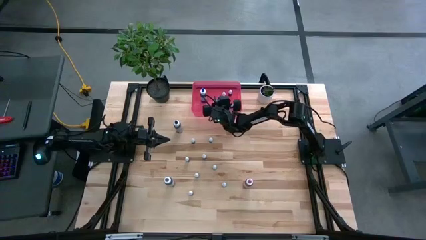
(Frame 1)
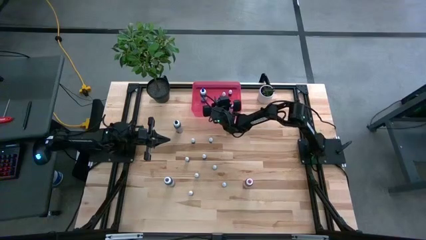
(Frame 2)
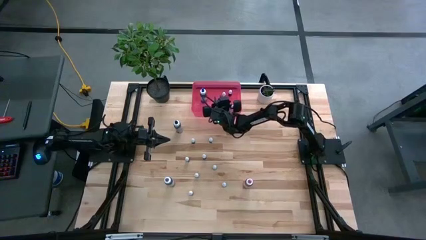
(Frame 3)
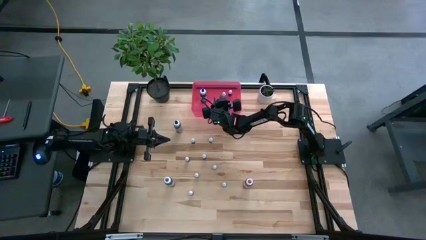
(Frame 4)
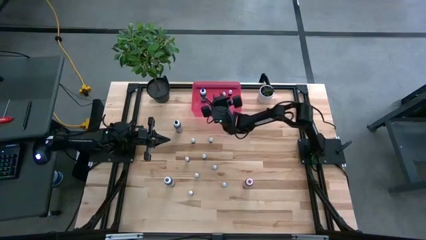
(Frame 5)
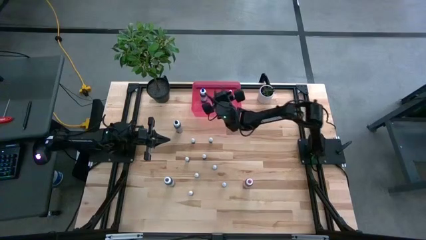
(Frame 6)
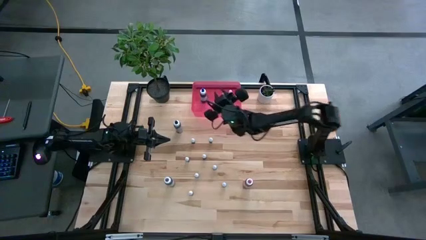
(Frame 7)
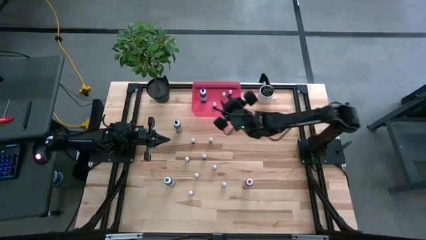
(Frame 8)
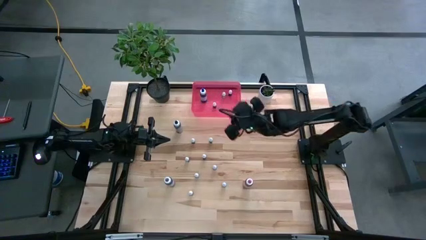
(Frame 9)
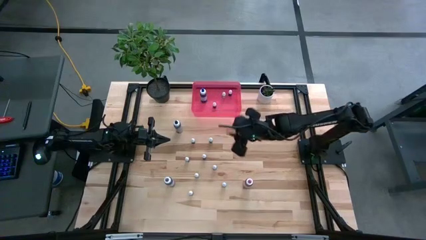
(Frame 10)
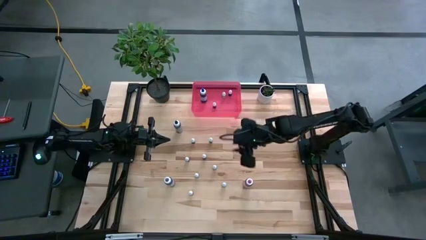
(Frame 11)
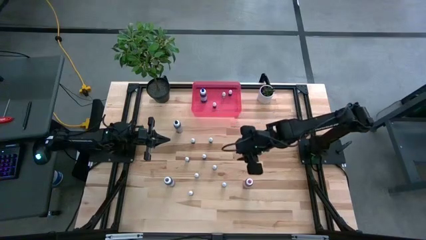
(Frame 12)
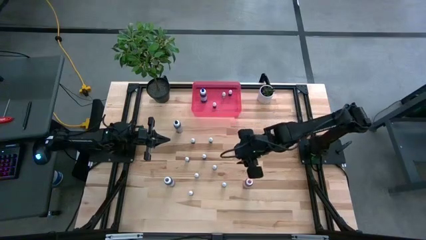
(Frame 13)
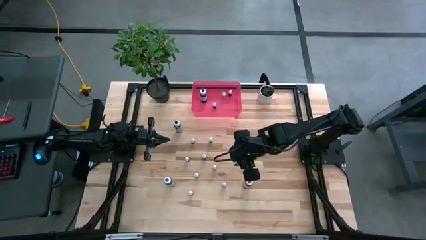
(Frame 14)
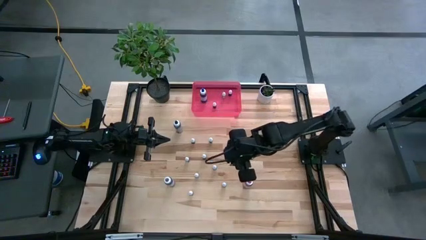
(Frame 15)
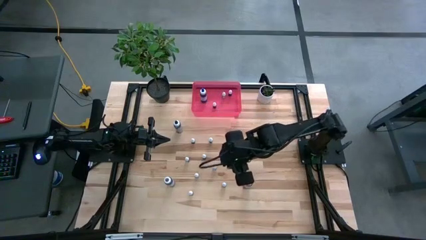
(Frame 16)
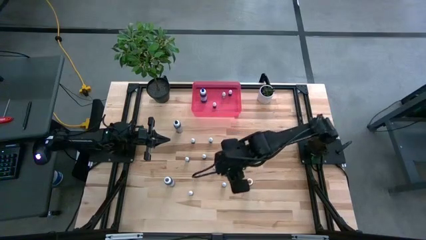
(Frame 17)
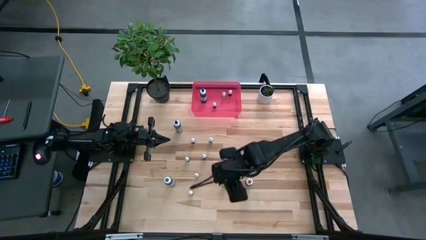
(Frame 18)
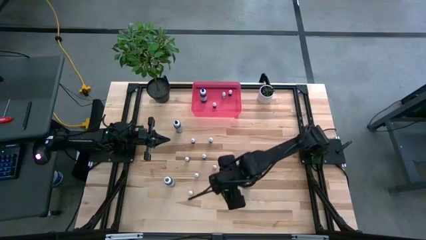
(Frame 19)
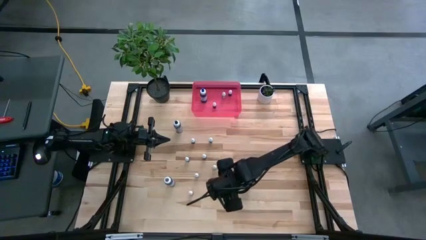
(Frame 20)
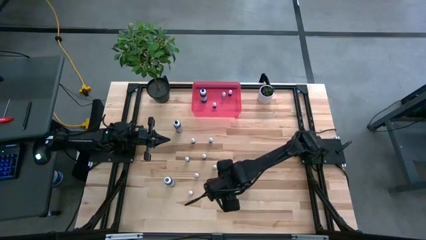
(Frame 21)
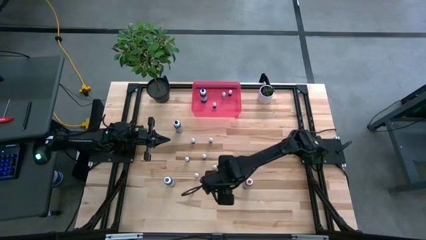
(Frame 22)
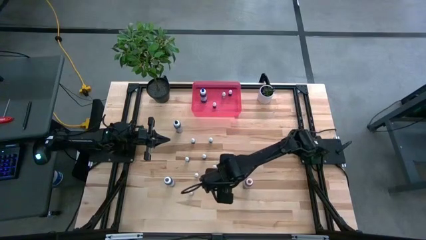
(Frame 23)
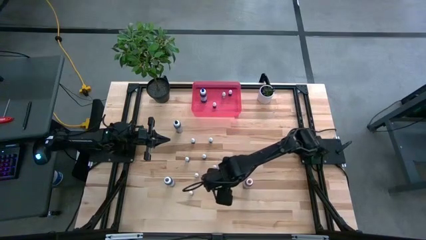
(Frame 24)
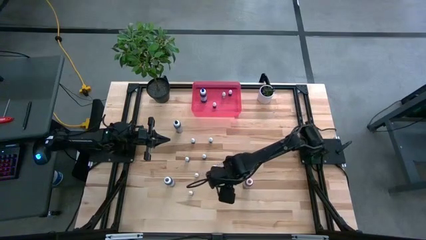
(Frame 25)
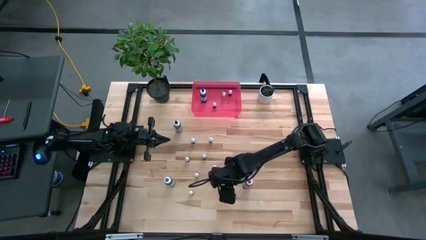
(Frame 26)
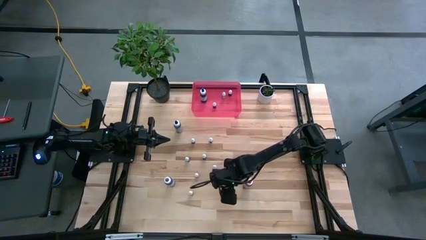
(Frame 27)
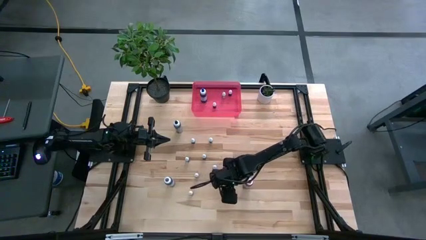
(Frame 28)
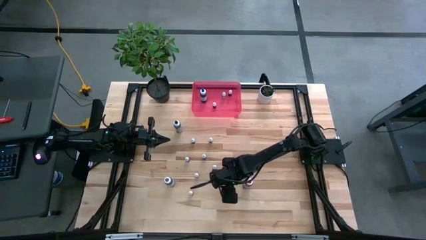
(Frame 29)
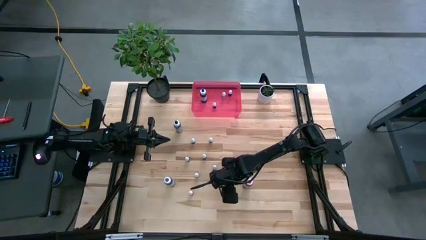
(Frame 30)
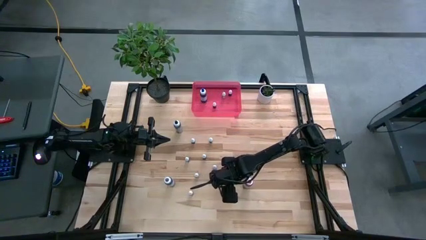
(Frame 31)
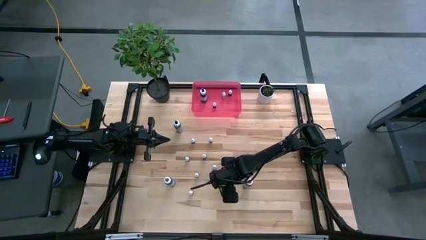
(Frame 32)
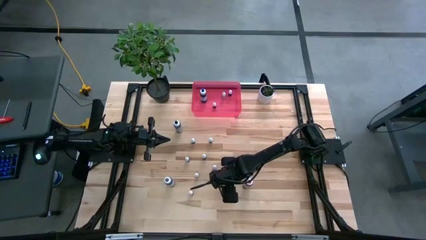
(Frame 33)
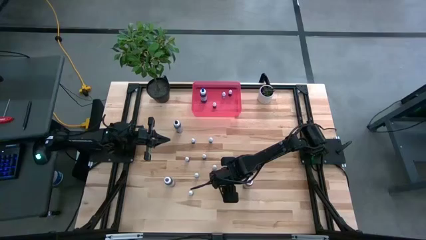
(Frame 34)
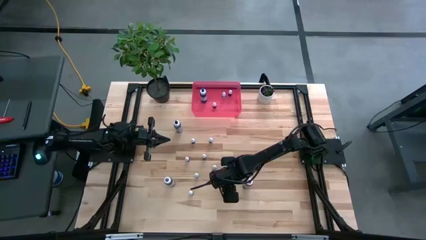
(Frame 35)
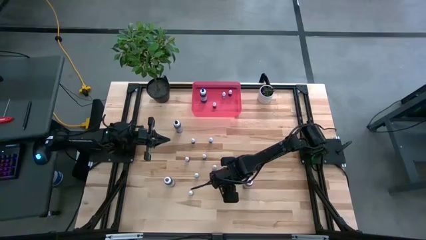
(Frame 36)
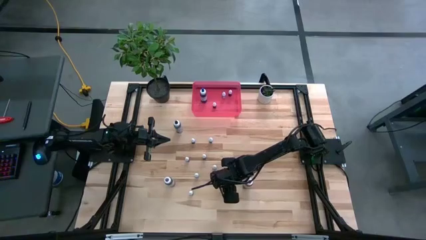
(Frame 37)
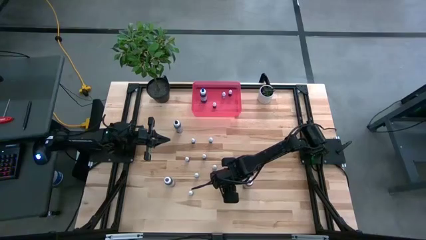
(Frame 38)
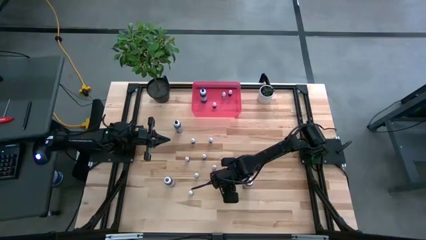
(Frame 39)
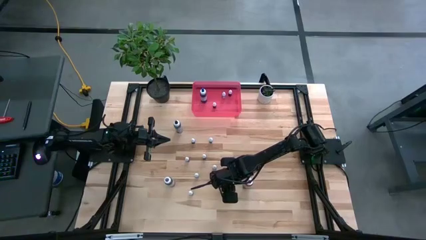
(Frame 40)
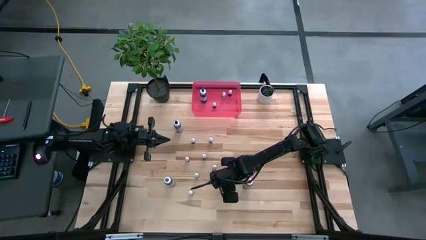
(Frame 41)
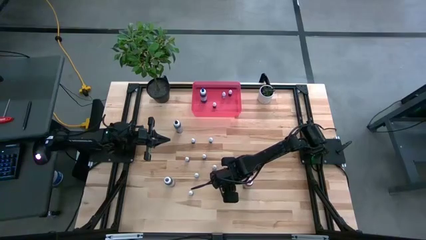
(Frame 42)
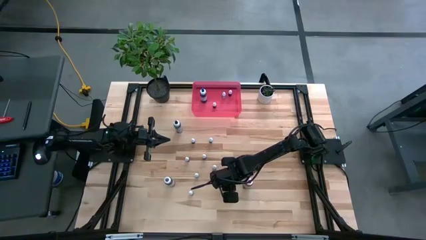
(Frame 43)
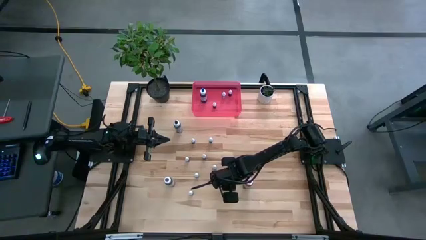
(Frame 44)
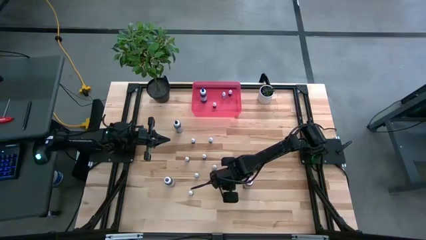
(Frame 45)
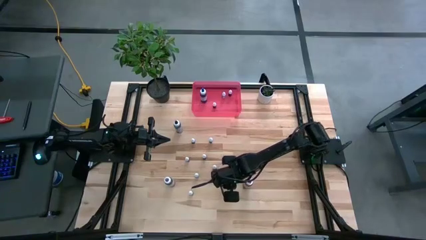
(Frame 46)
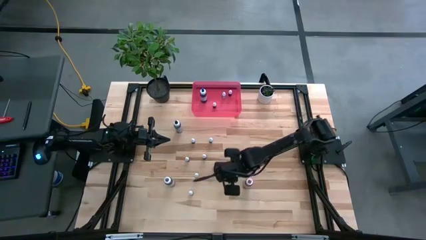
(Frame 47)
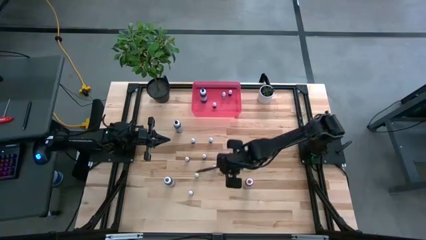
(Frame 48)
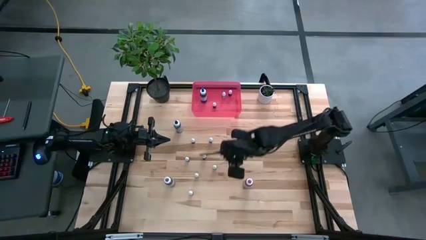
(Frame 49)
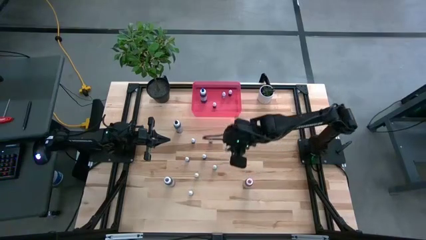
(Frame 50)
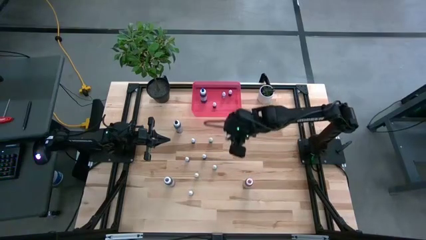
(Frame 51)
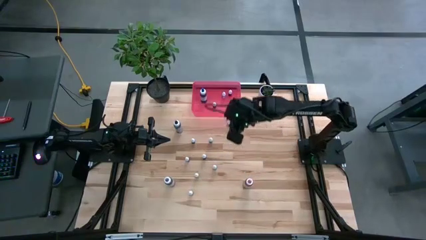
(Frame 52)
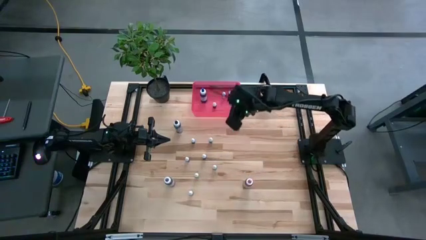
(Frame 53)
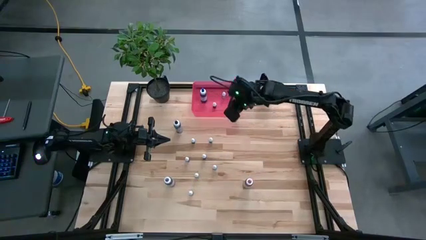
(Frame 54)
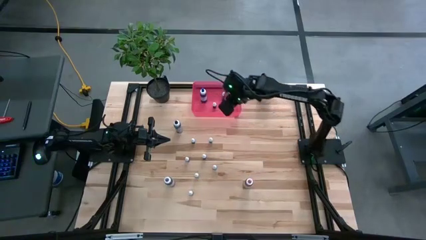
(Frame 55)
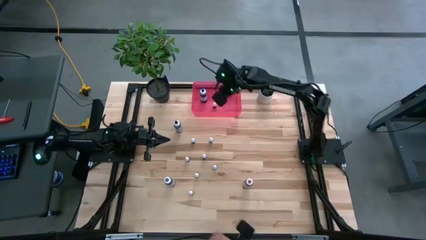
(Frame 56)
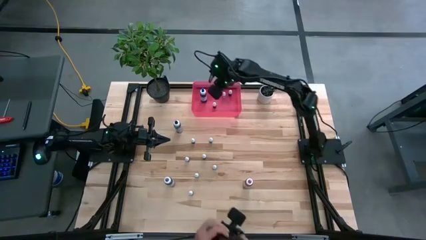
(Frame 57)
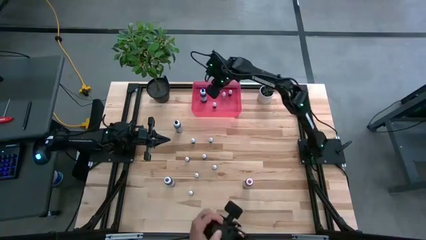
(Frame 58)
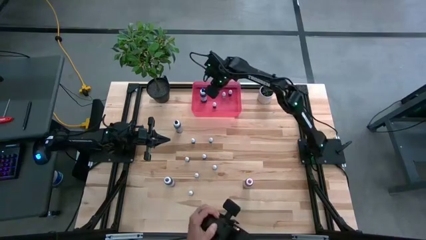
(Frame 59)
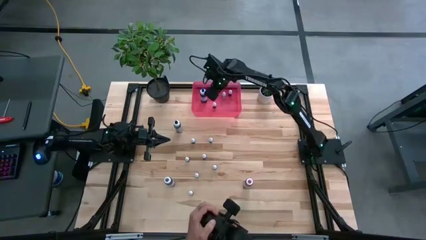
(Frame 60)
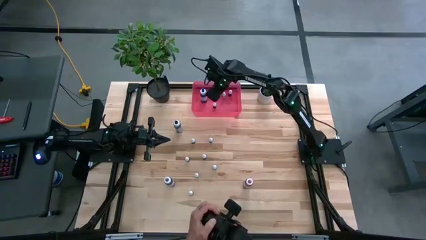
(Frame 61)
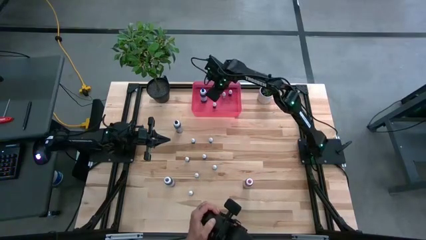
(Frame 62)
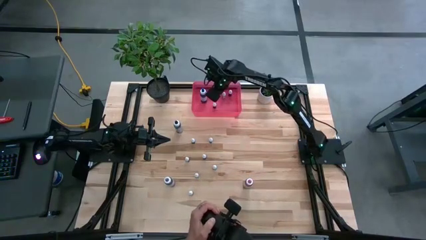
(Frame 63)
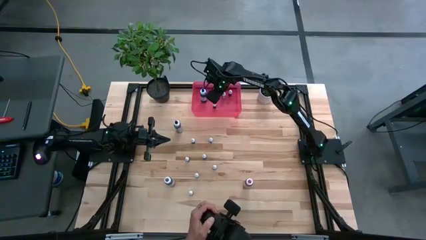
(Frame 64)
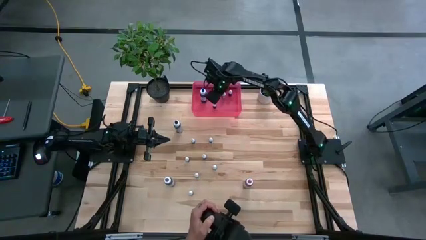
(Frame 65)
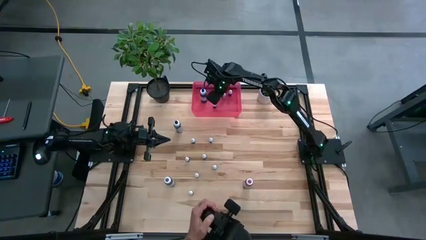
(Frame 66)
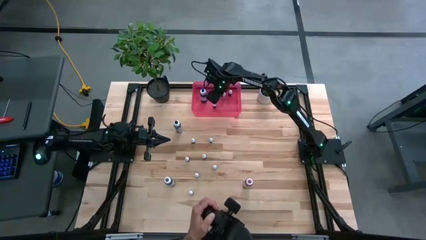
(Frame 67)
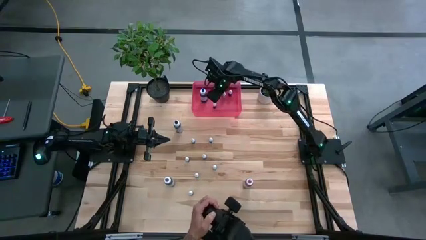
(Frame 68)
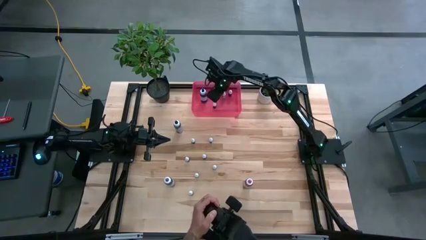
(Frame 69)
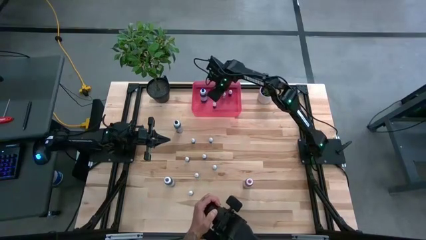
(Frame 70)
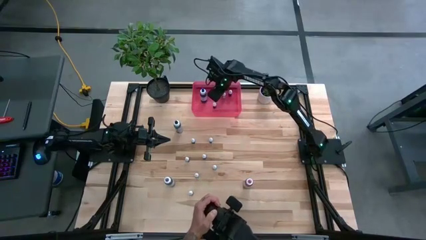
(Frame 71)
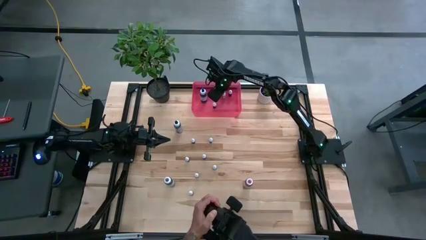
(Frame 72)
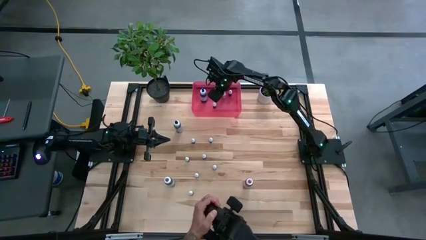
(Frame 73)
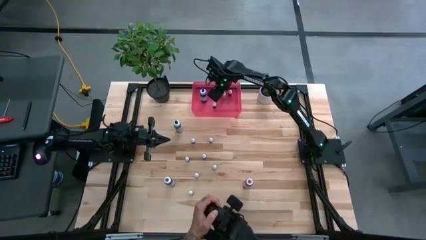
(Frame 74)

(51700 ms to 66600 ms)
Task: Pick & Place food coloring
Put the small red food coloring bottle into the red bin

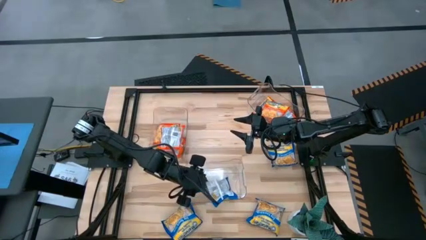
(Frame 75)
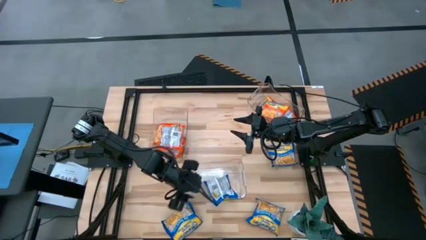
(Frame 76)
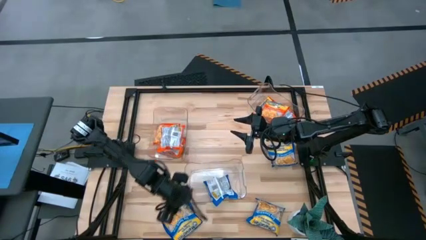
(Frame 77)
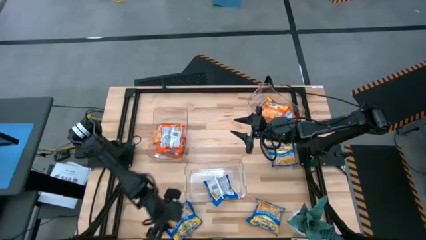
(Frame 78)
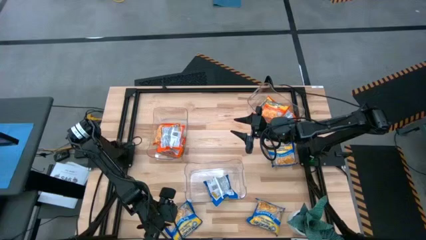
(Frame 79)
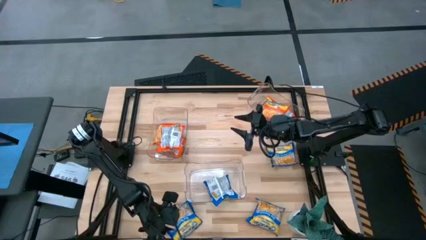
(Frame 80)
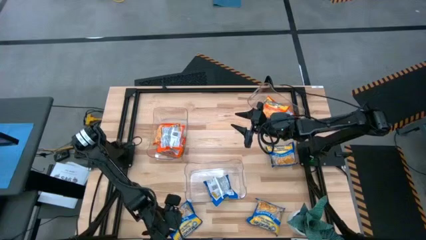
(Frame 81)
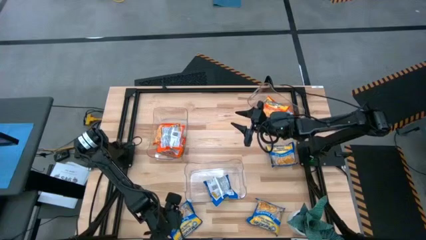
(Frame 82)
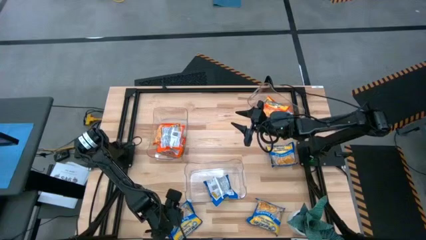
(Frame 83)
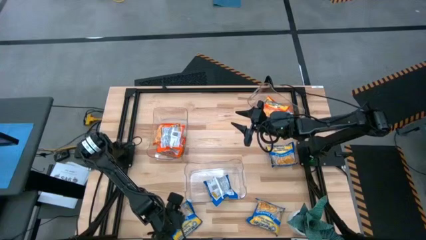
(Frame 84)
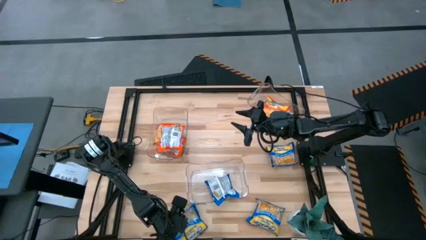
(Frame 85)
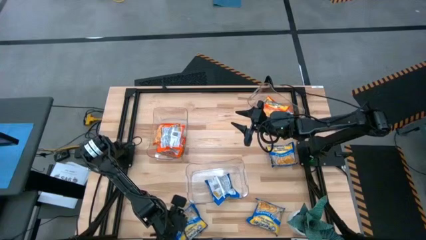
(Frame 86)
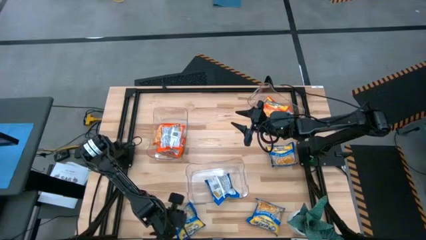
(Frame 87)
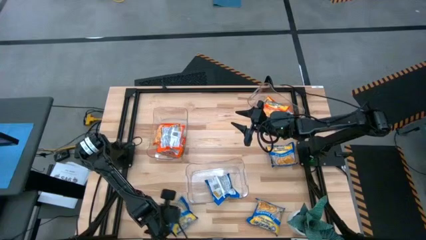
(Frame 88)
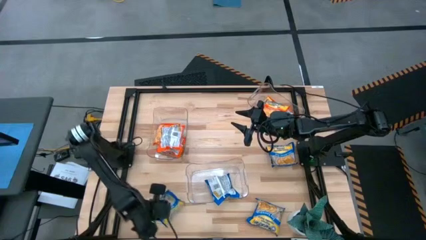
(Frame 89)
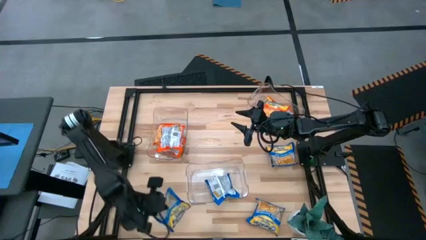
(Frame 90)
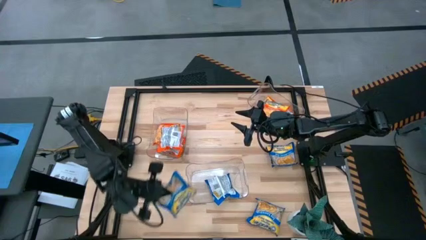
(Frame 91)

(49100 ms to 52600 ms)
Task: Sort Maruchan noodles
Put the blue noodle pack into the bottom transparent bin
